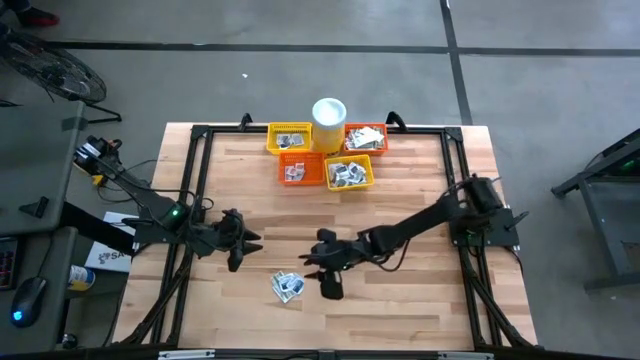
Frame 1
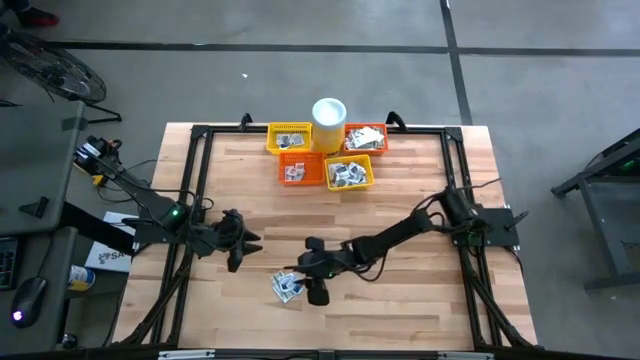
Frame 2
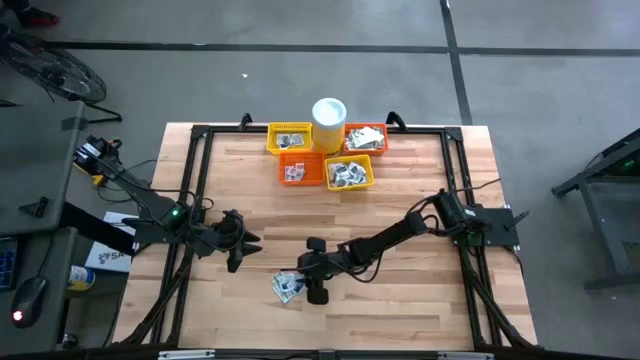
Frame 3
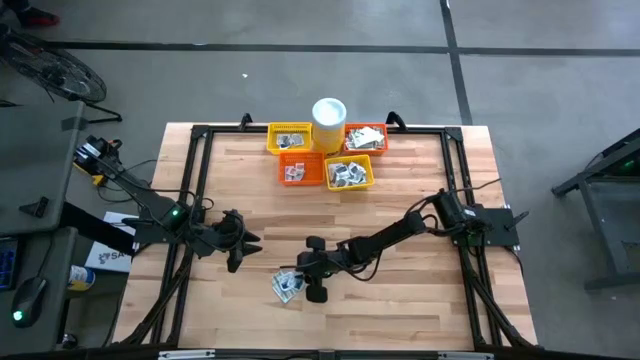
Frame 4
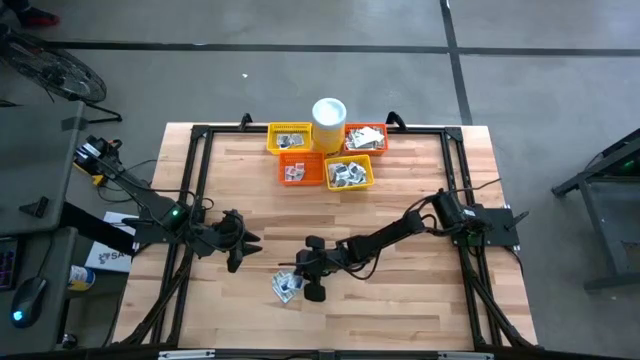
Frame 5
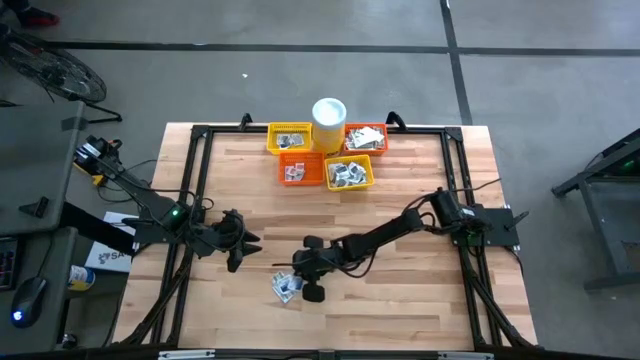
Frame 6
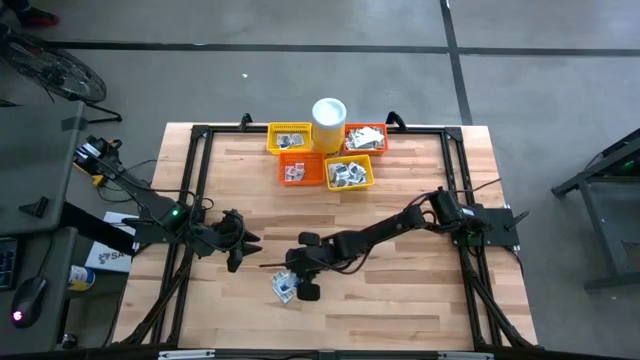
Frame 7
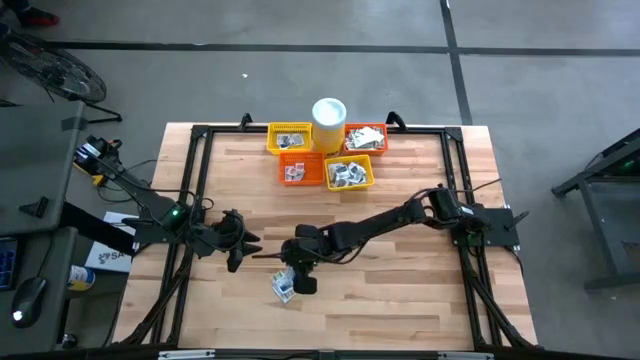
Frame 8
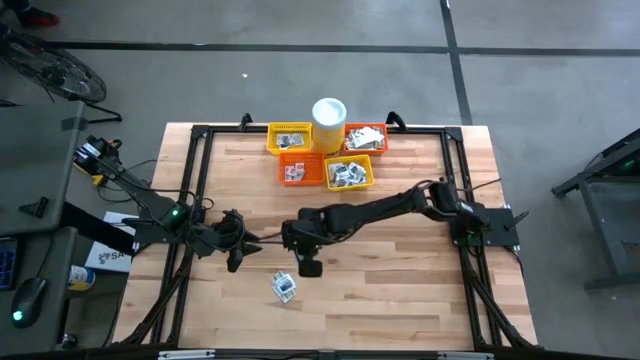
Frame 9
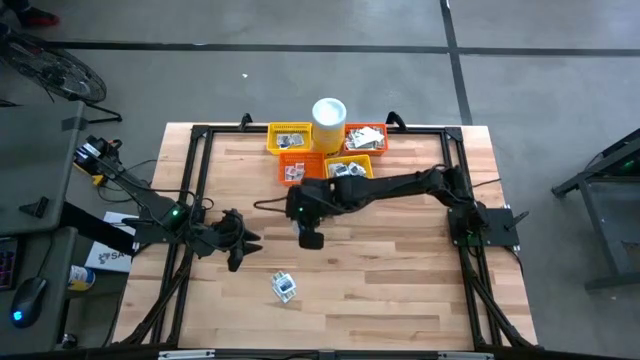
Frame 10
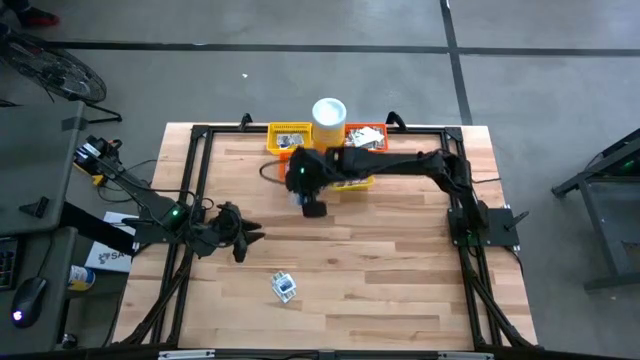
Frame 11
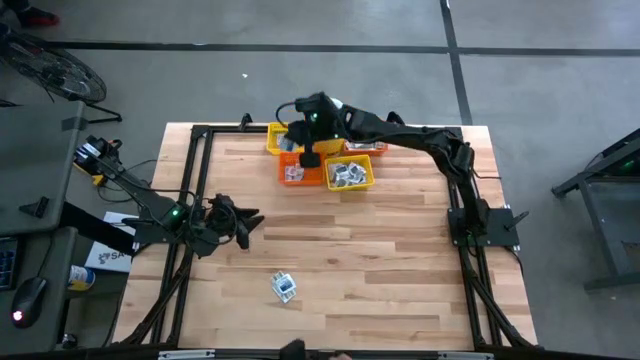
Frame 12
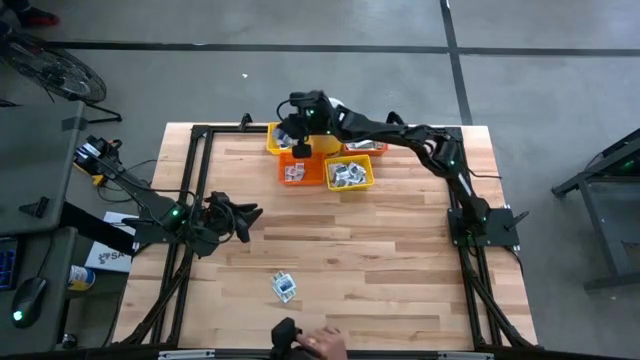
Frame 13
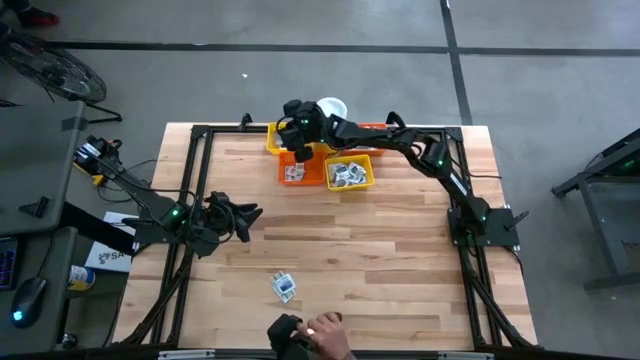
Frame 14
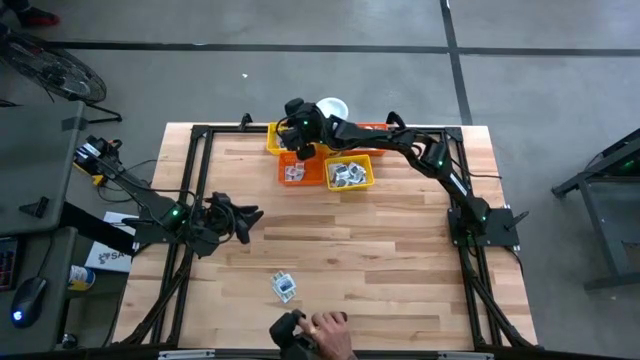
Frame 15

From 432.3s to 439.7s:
Task: Pick & Place First Aid Supplies
Put the blue alcohol pad into the top yellow basket

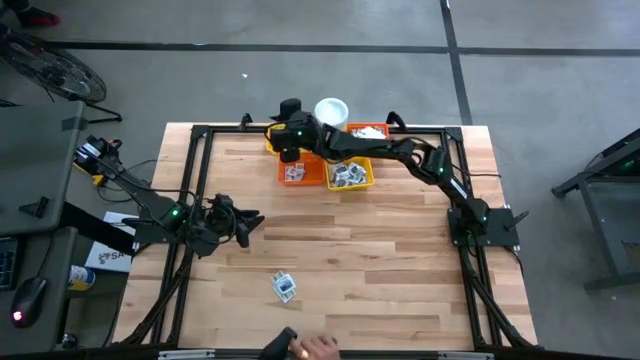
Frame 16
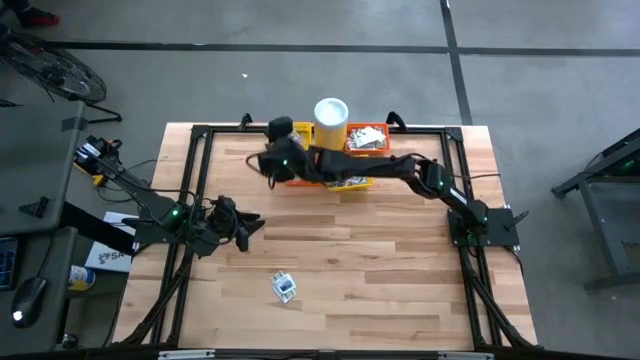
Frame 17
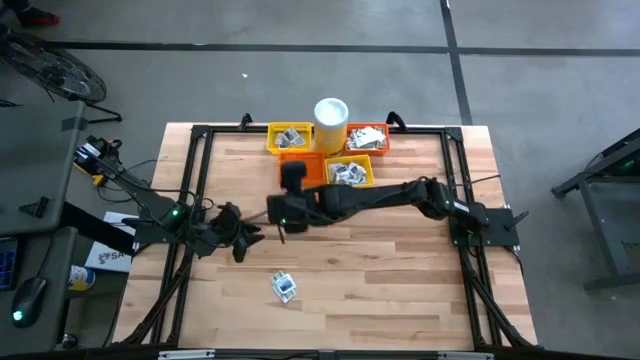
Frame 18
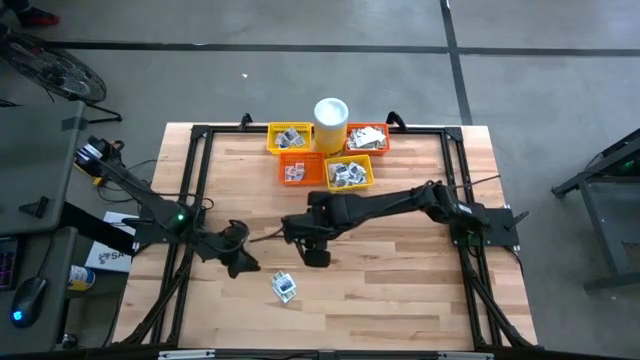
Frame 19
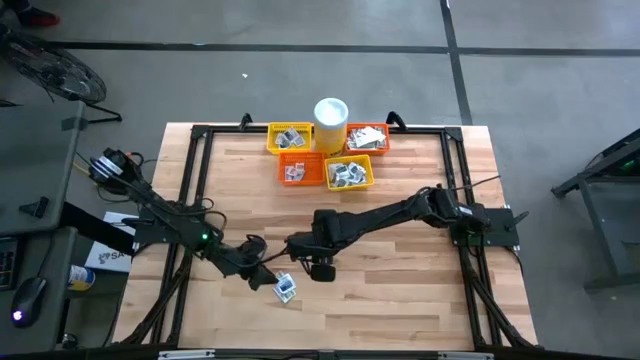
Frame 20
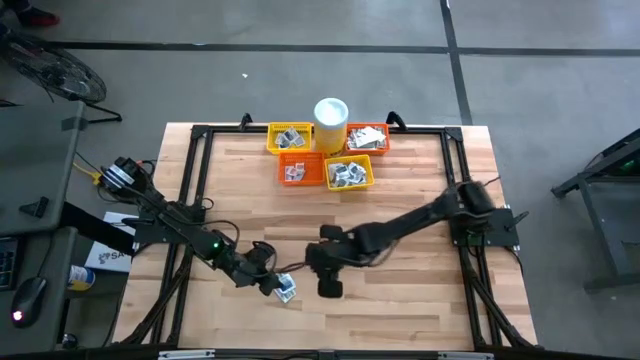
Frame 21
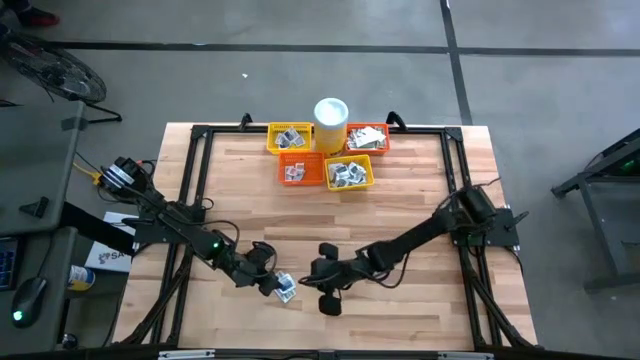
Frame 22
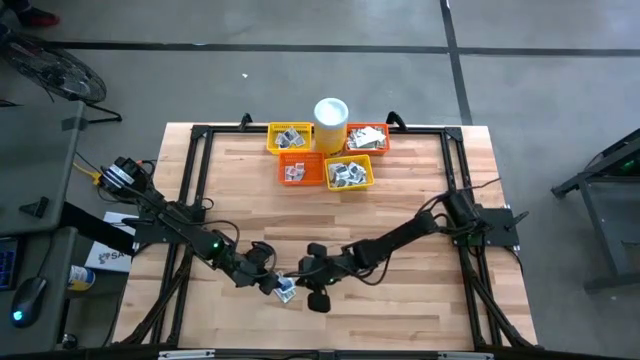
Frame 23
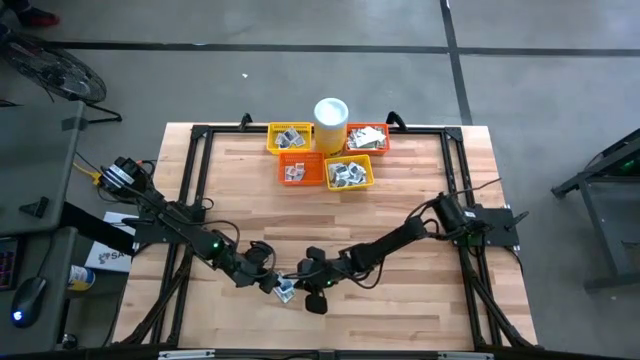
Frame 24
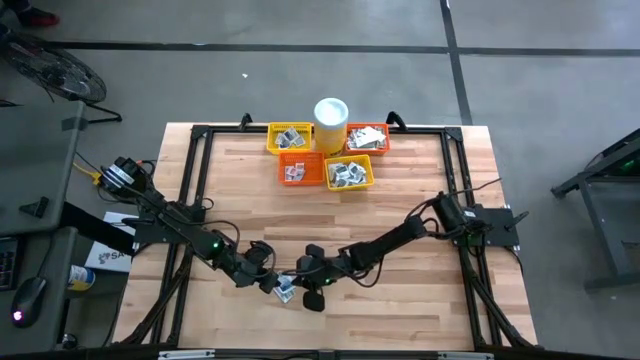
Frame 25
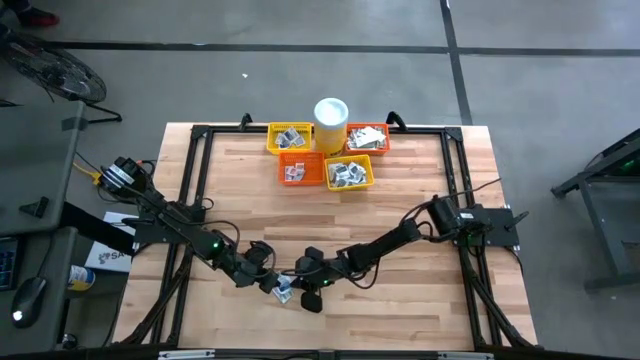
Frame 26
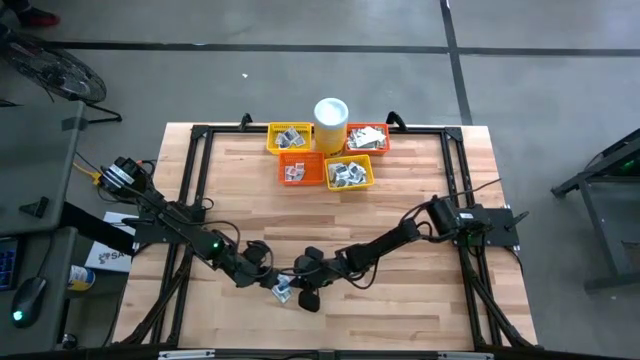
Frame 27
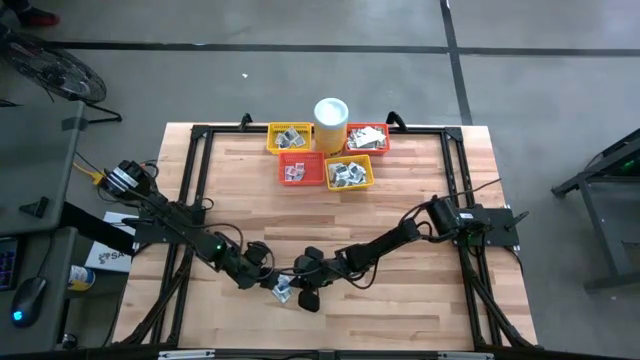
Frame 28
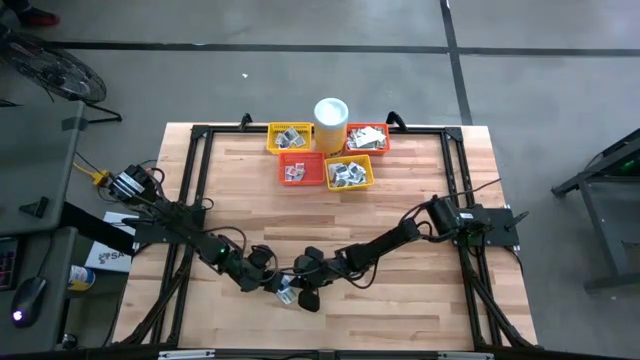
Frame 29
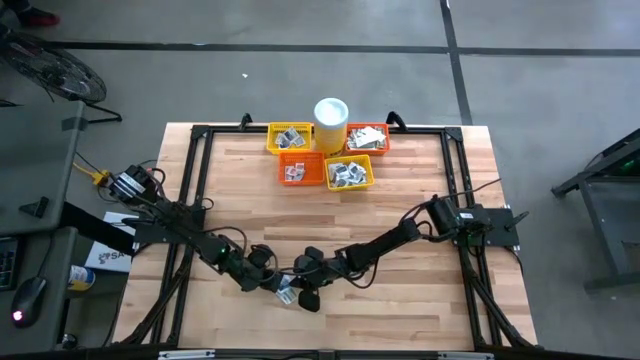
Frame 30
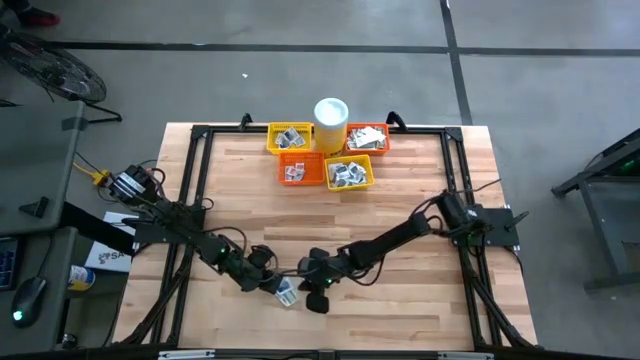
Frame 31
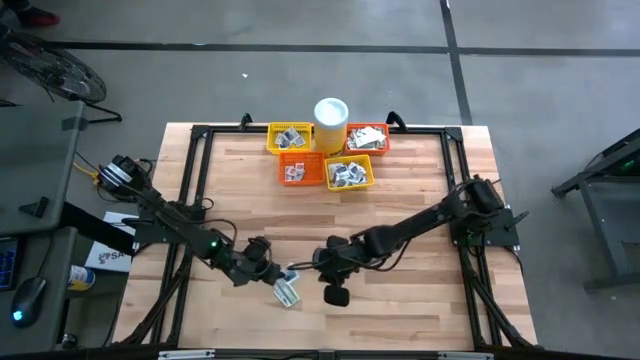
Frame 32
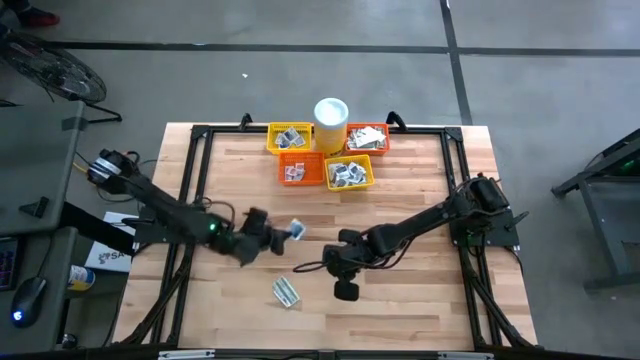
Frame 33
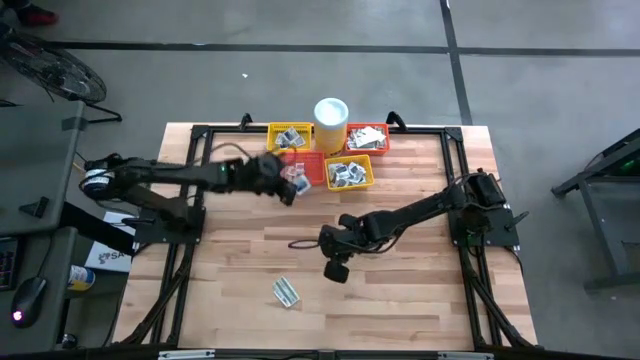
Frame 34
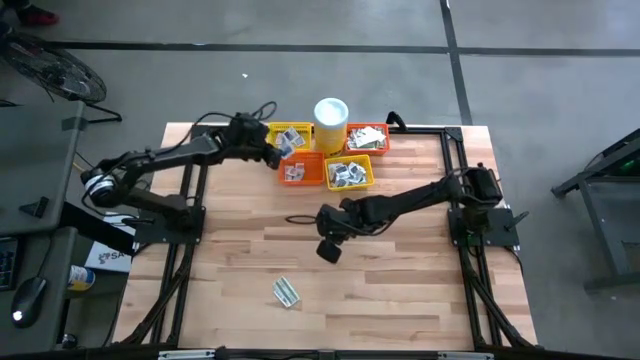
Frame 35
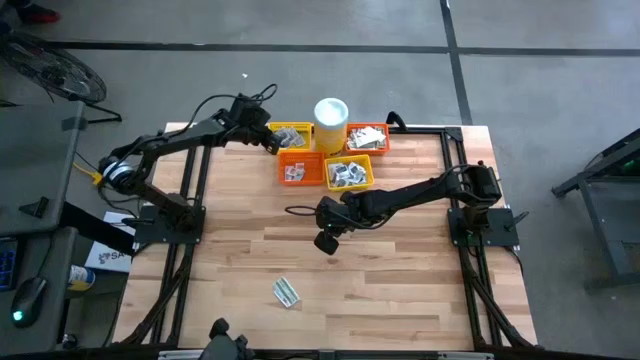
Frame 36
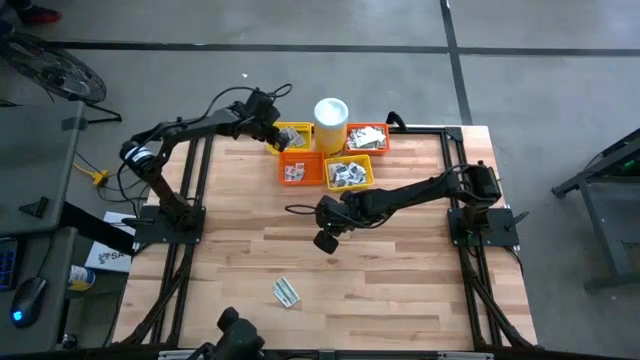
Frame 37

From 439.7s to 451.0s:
Put the blue alcohol pad into the top yellow basket
